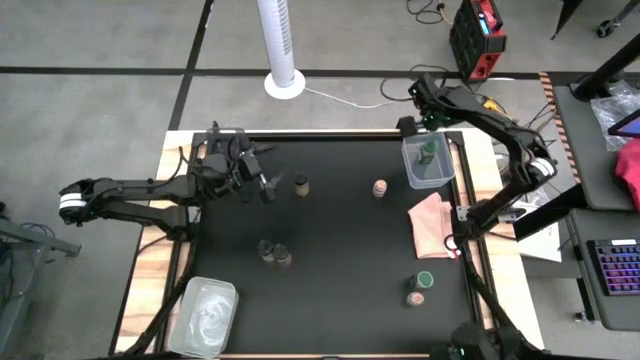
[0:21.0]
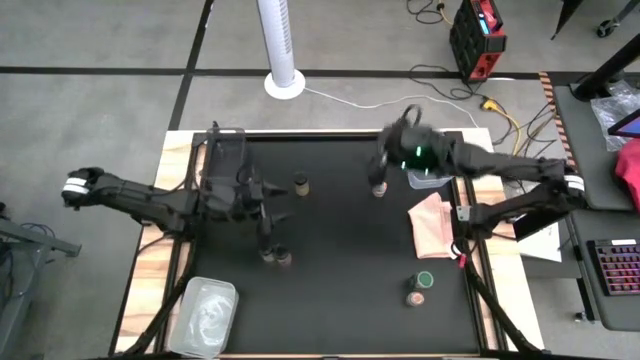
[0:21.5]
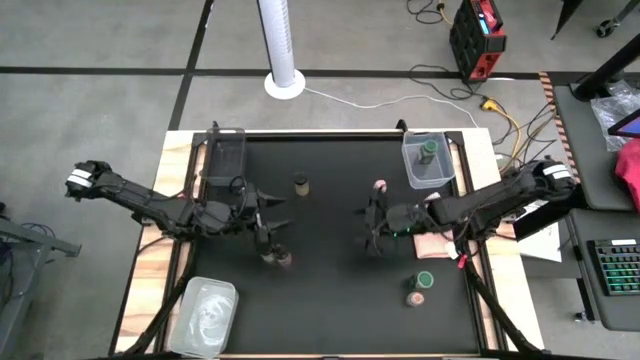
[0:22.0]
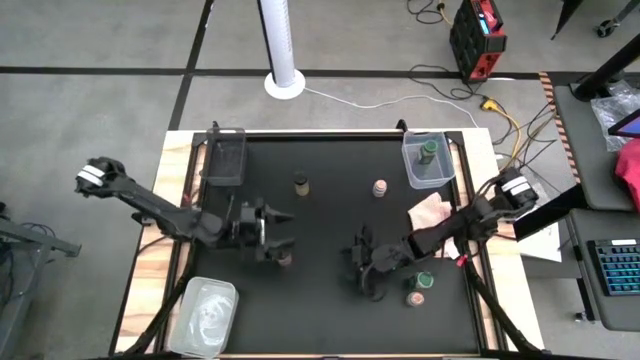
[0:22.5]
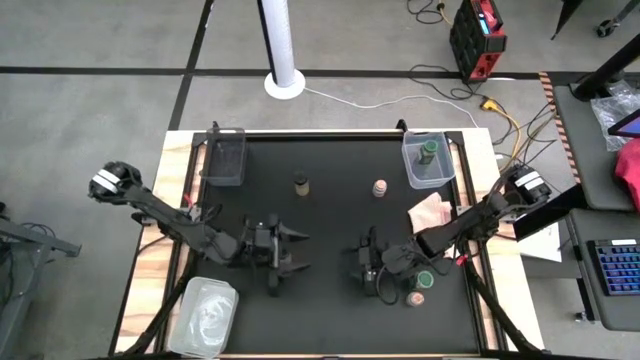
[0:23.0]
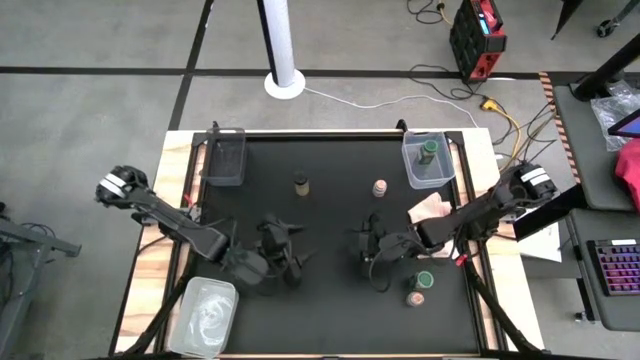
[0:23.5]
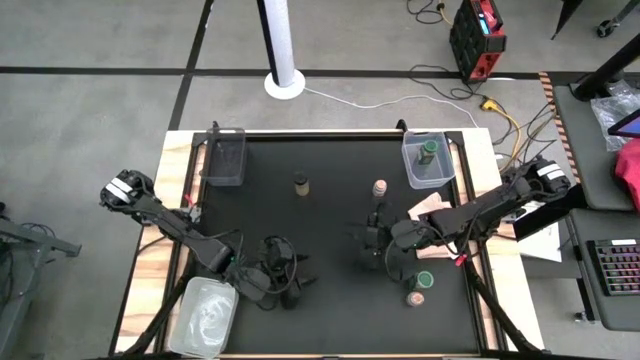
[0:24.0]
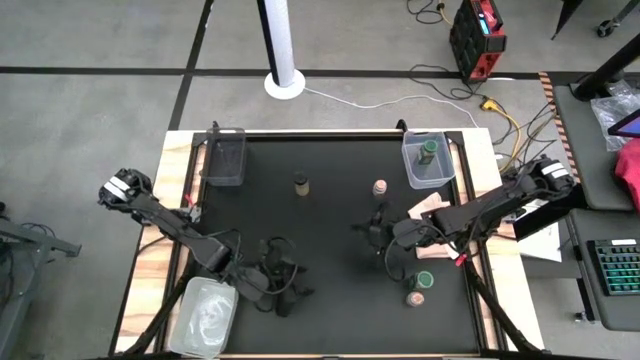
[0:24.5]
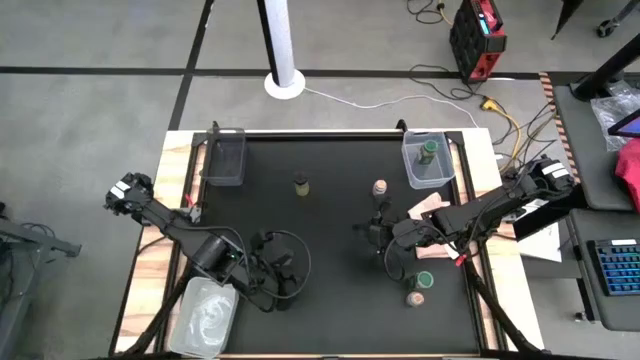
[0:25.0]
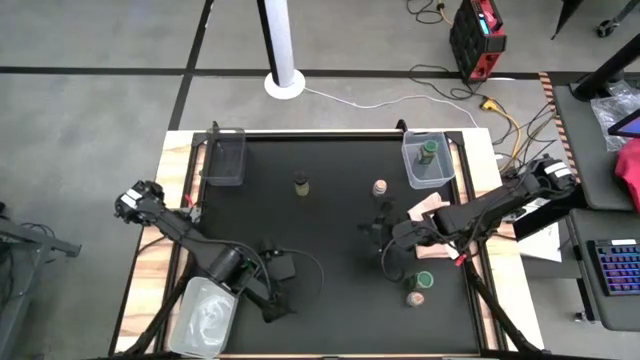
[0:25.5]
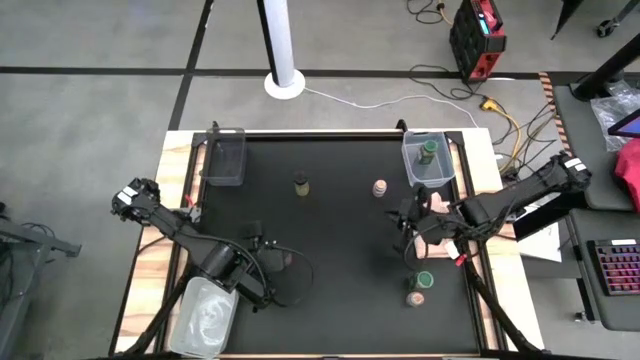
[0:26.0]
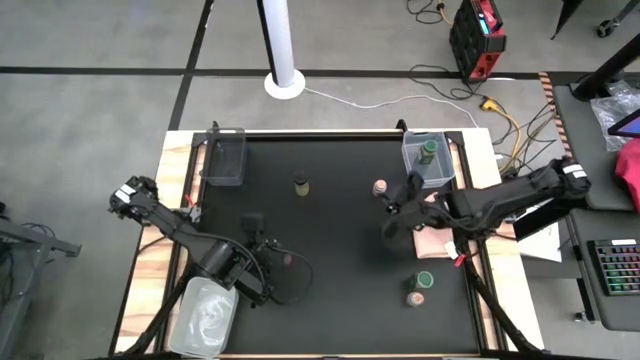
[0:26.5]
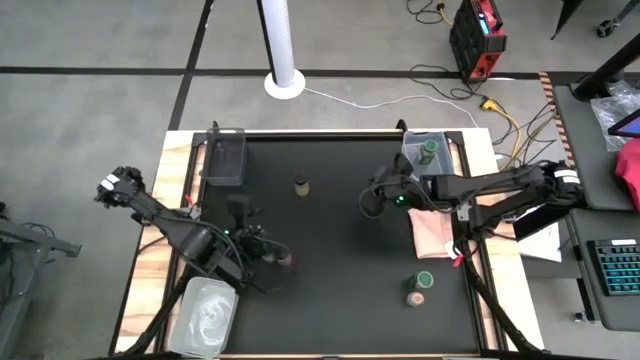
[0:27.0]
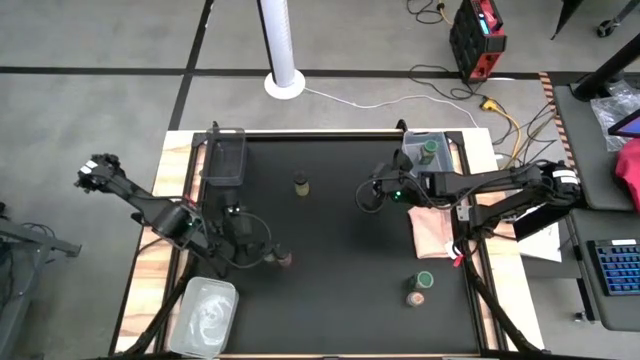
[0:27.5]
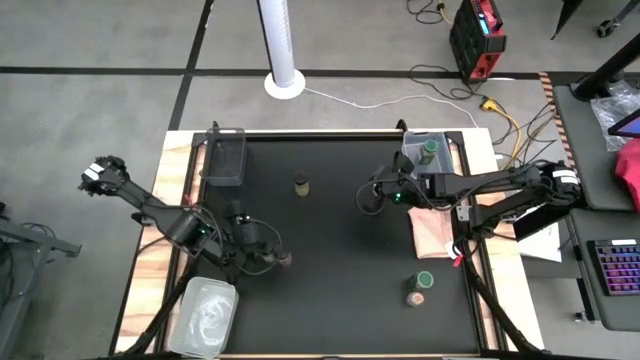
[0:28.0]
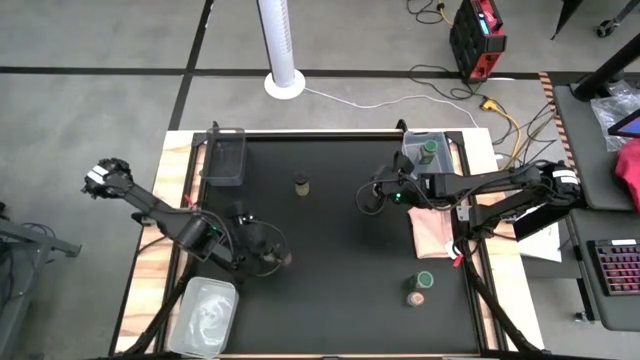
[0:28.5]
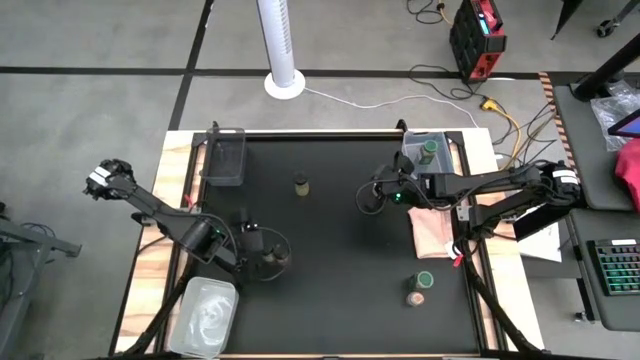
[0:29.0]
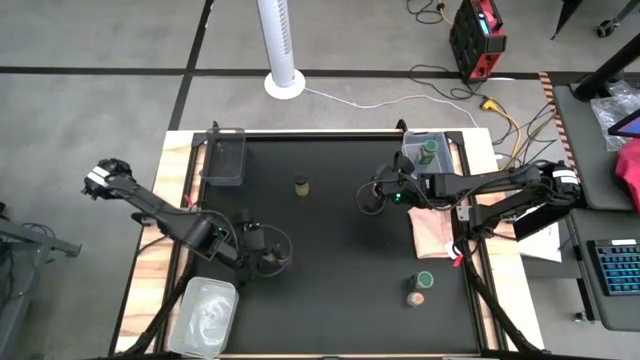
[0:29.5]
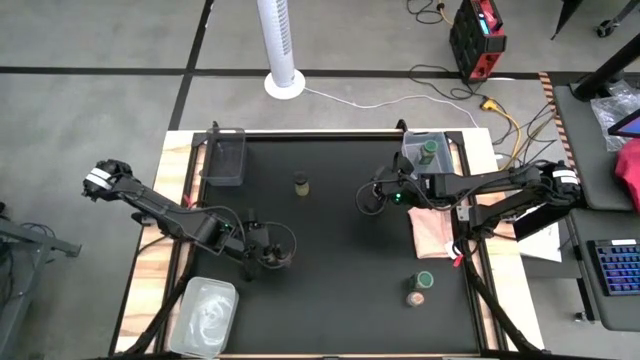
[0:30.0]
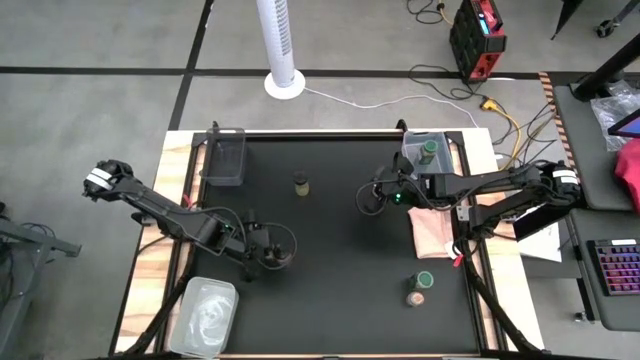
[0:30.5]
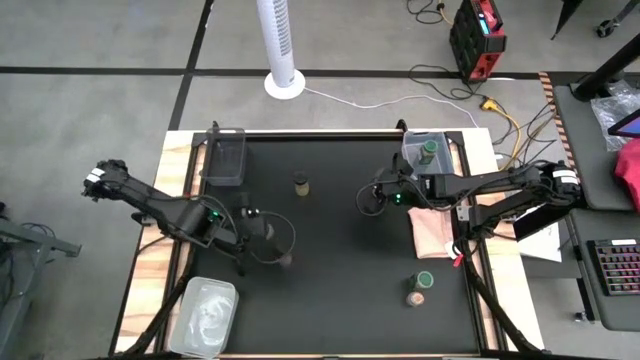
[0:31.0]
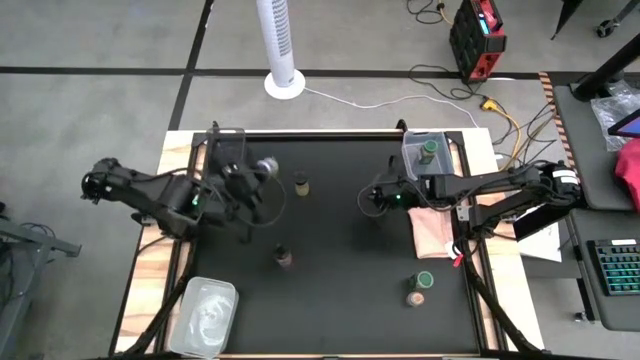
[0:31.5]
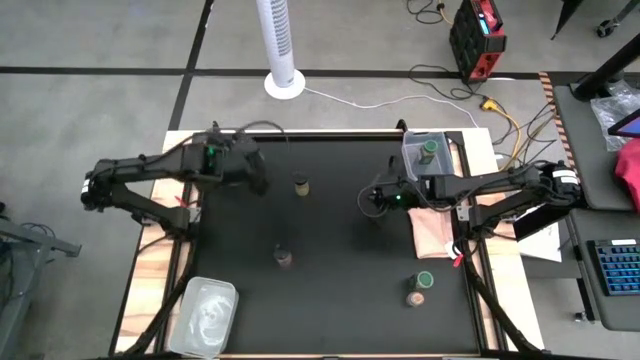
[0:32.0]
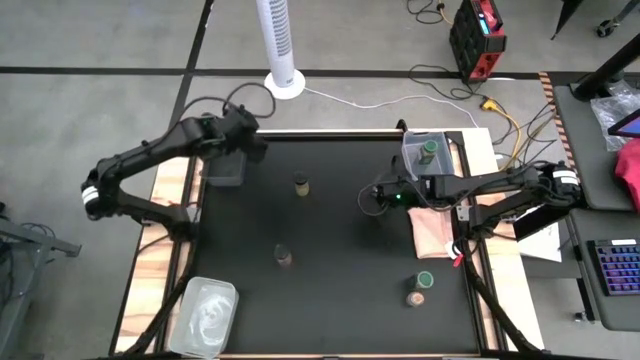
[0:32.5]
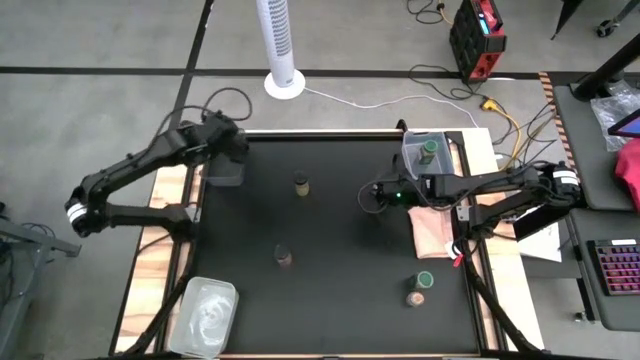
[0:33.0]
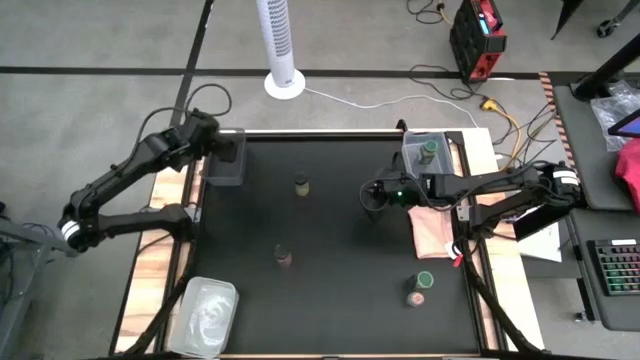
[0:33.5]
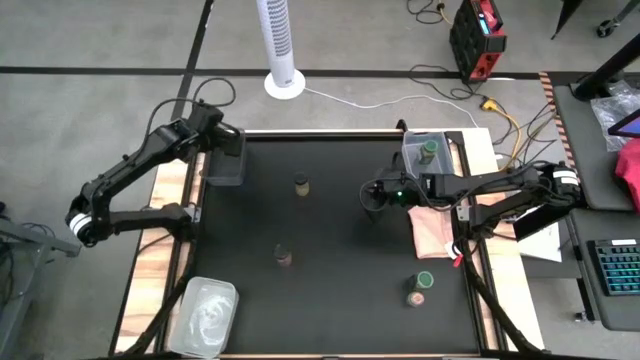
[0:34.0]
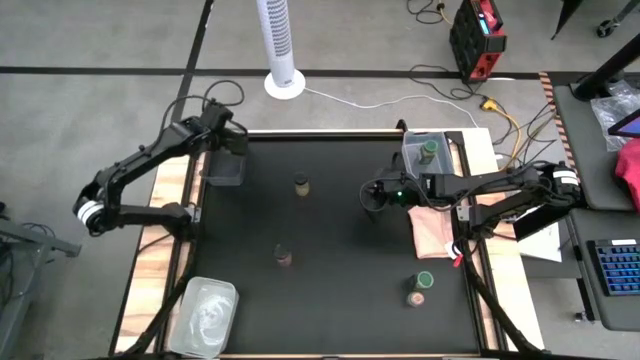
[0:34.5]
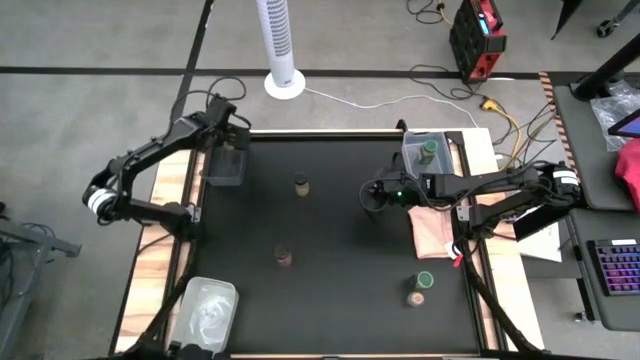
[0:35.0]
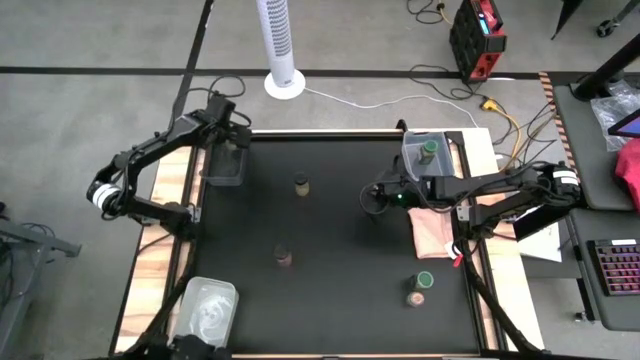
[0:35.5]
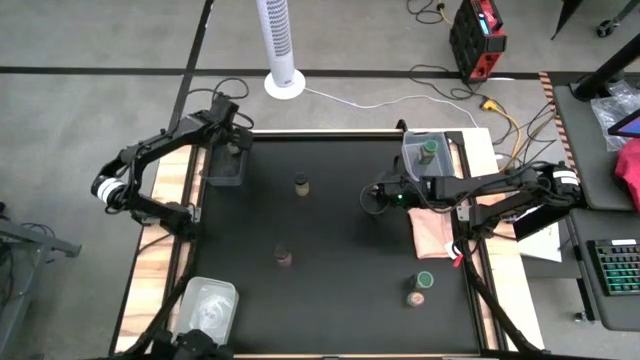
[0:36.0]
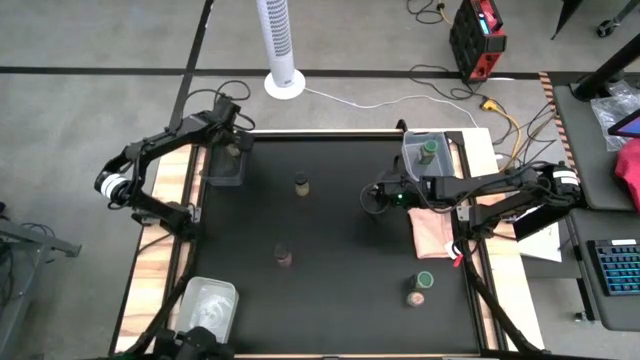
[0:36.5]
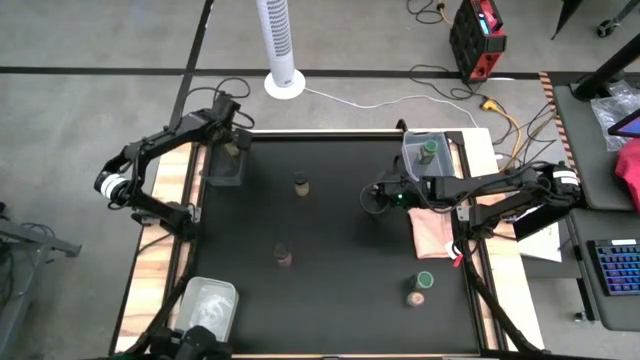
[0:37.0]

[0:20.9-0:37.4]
Task: Sort spices by type
Put the bottom left black spice bottle into the black bin

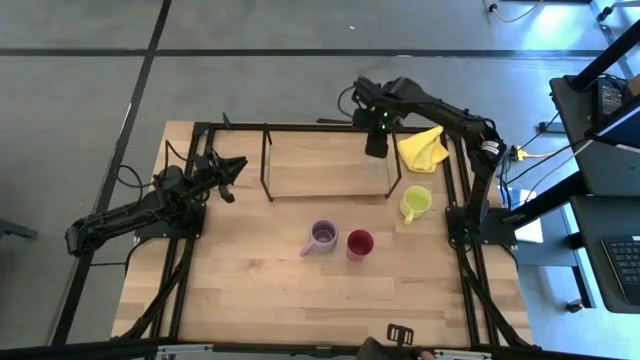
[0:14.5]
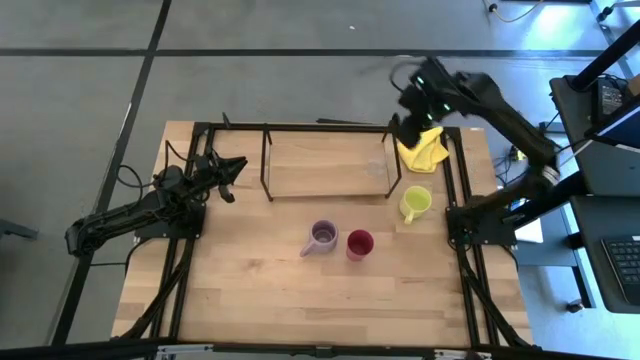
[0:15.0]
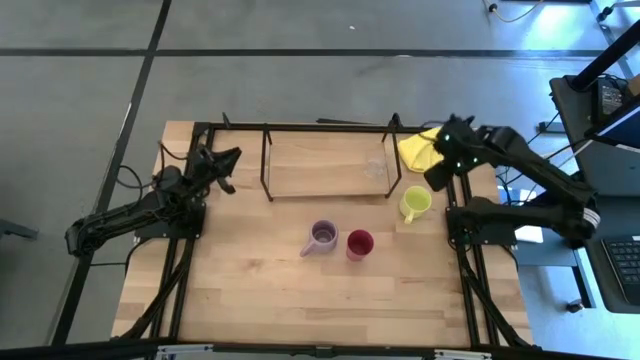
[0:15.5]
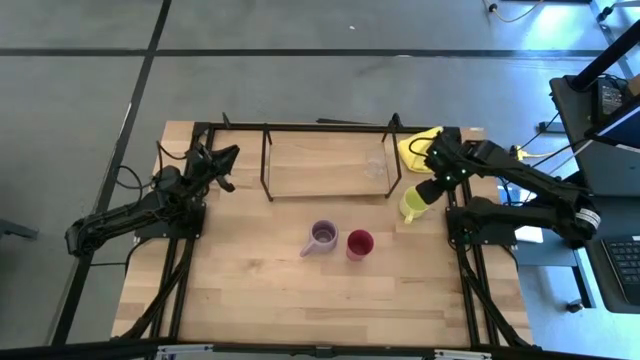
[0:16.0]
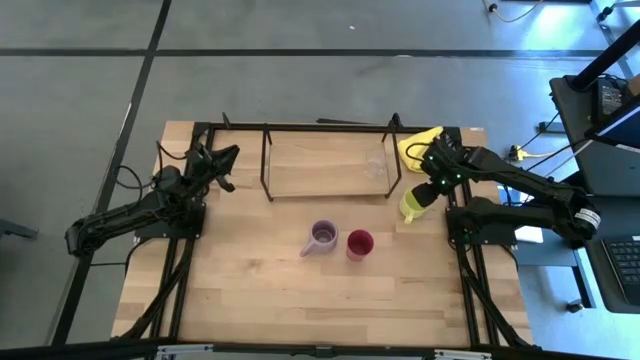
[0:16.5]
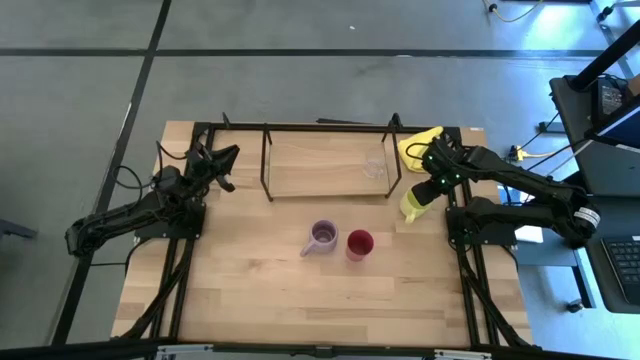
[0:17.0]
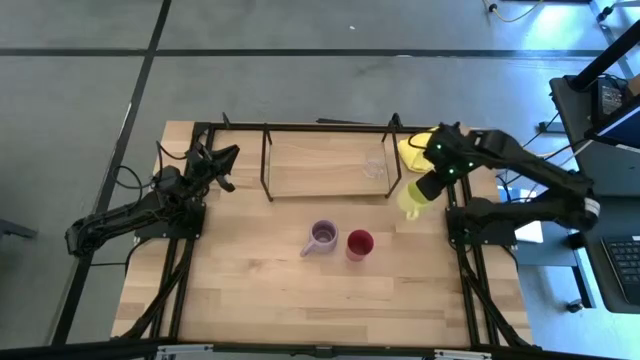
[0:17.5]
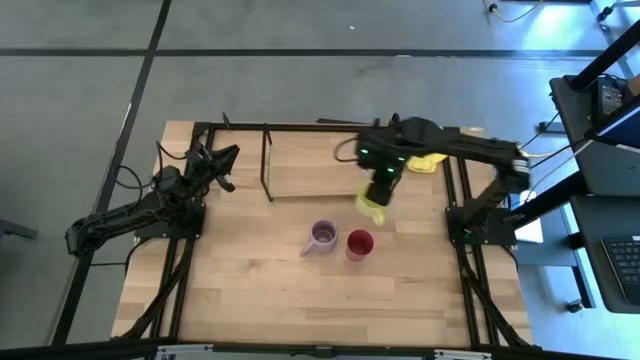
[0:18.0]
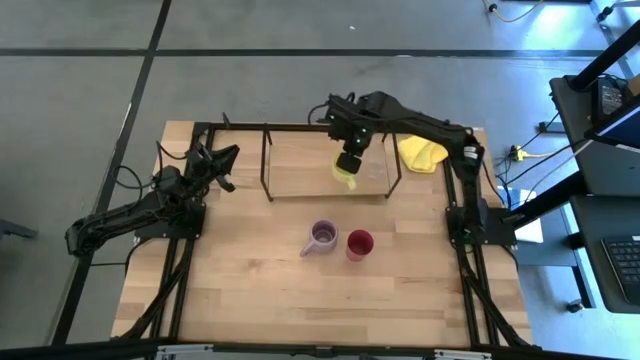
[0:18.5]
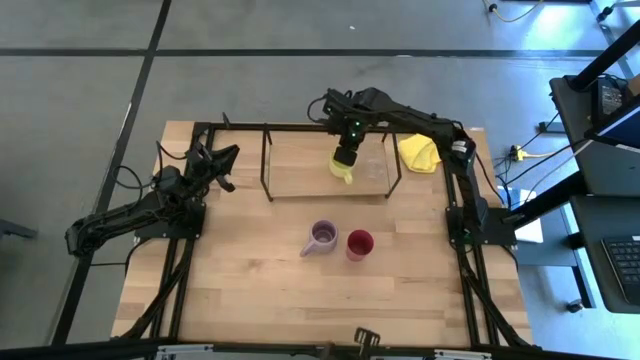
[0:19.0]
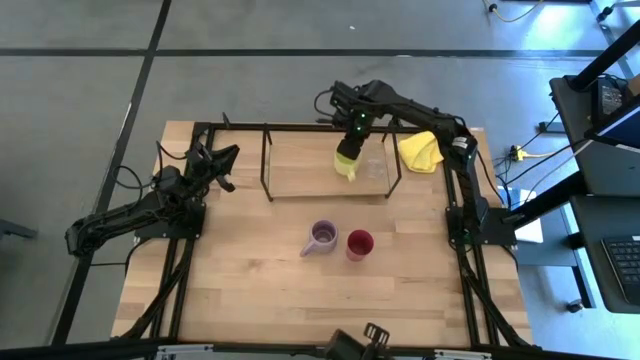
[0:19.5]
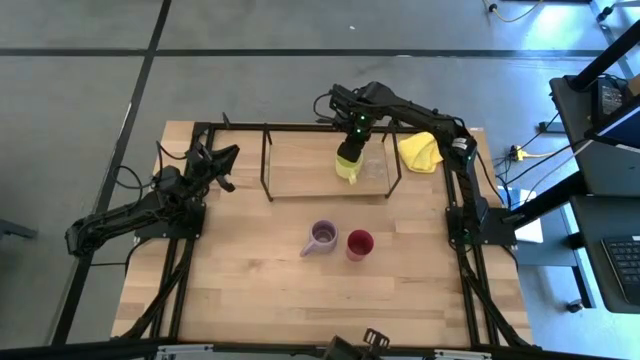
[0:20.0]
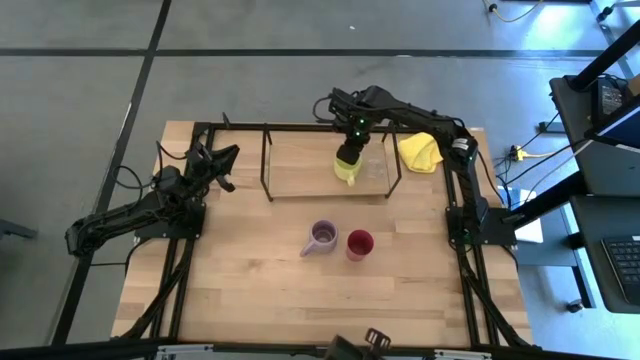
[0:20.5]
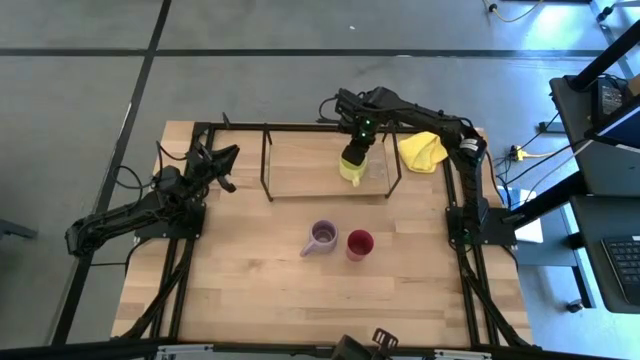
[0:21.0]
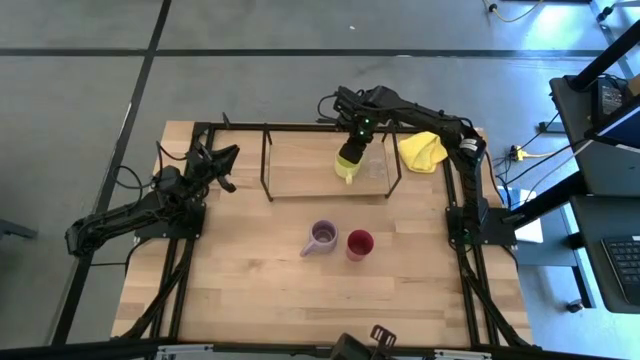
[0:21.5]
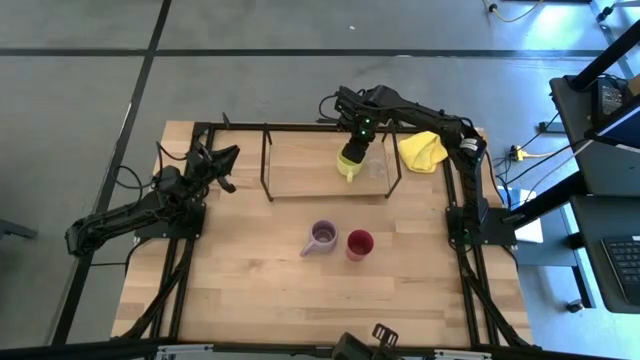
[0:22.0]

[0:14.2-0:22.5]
Task: Stack small to large cups/mugs on shelf
Put the yellow cup on the shelf
